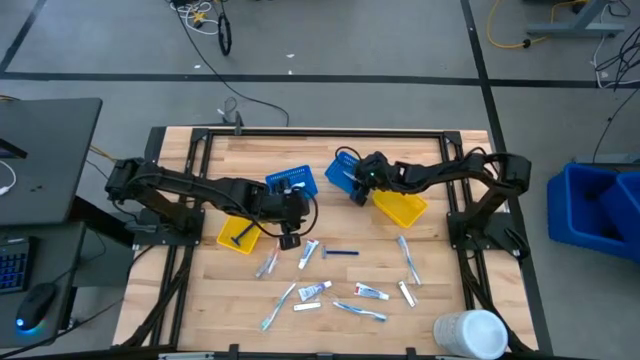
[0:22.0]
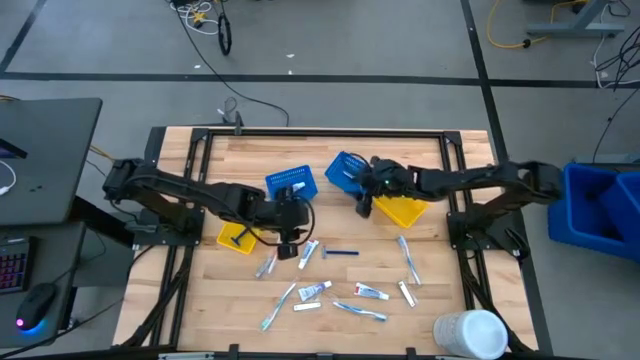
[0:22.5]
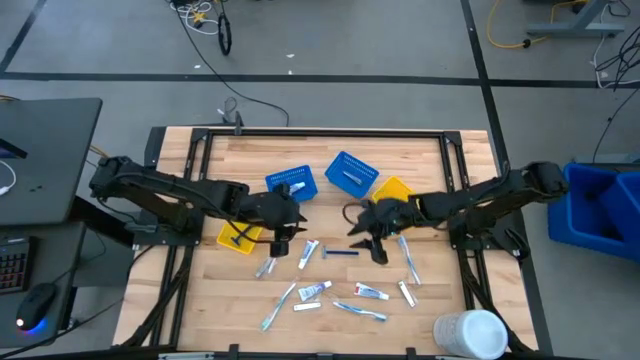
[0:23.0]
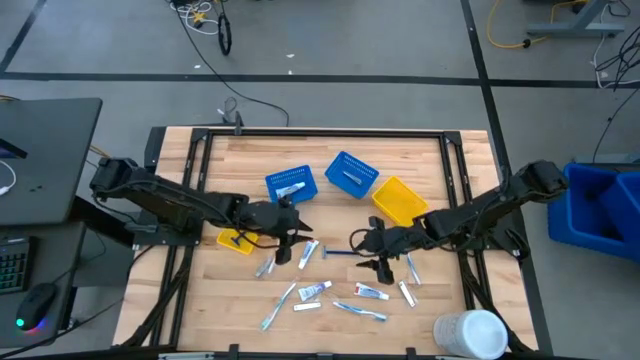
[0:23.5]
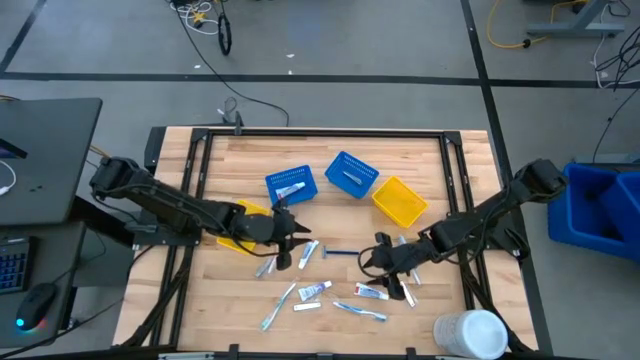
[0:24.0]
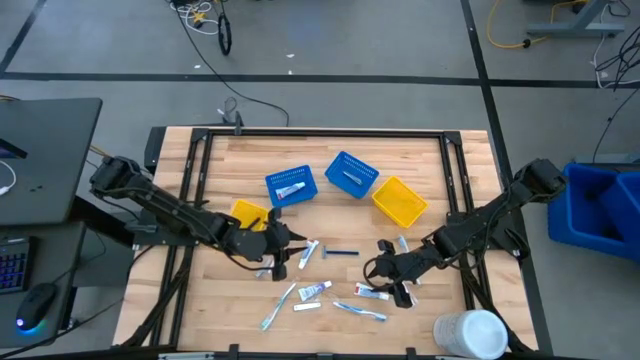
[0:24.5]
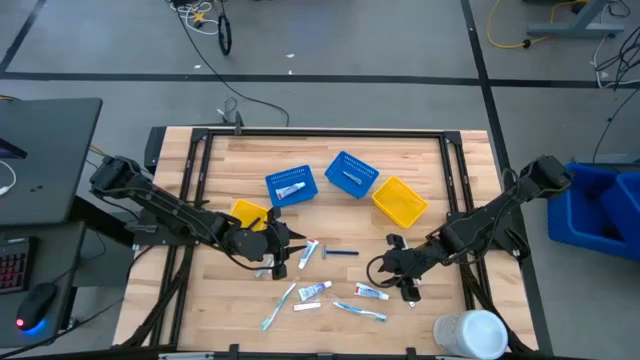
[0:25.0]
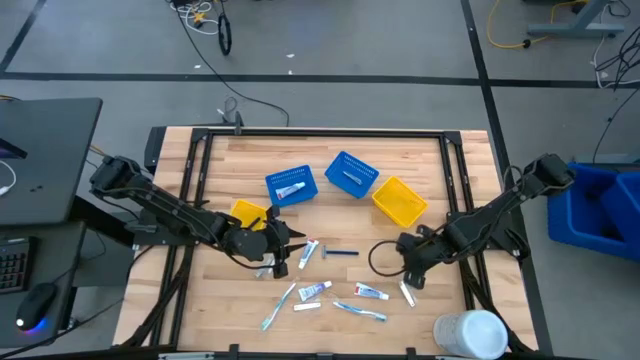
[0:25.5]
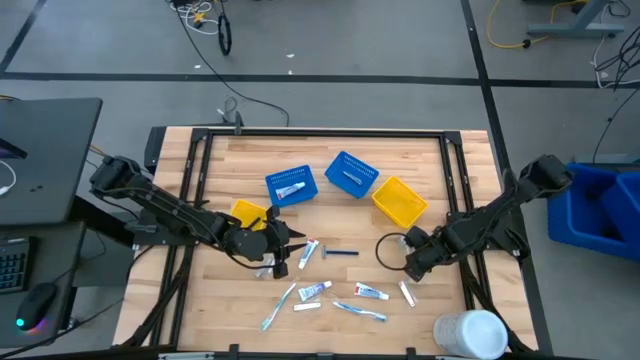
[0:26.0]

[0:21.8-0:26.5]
Task: Pick & Place Travel size toiletries
Put the blue toothbrush into the right yellow bin

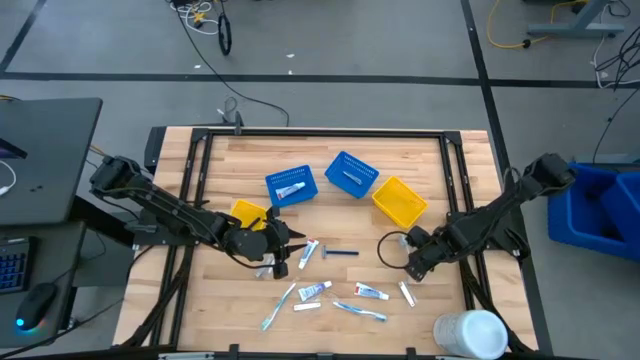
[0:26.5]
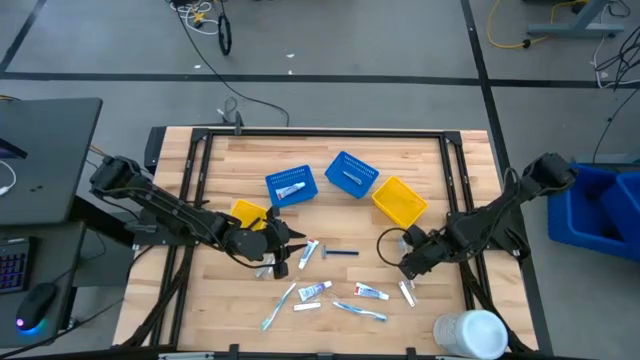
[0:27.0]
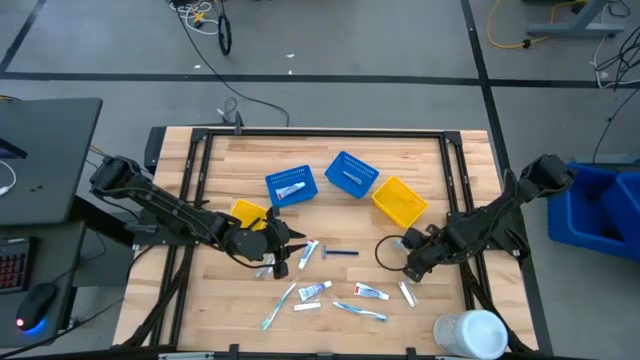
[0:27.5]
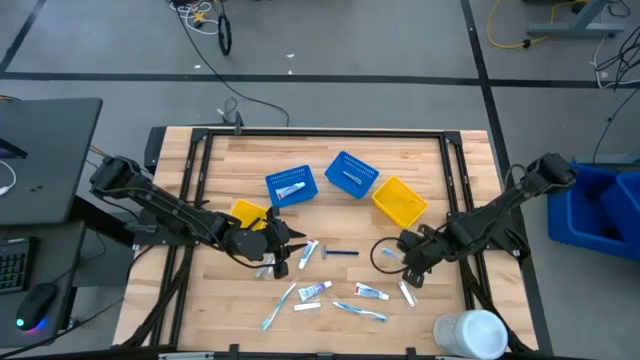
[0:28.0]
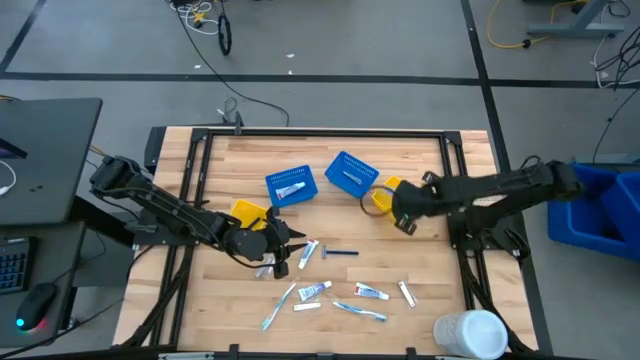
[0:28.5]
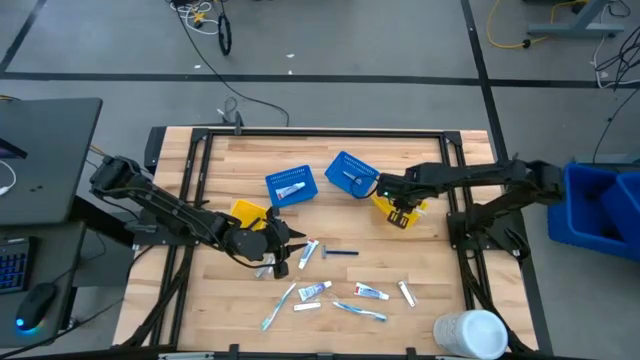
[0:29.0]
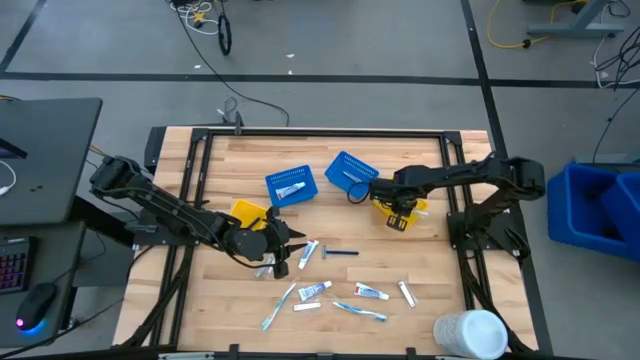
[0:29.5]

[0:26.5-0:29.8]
Put the blue toothbrush into the right yellow bin

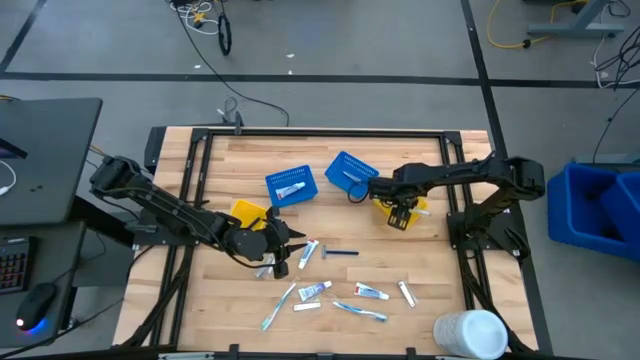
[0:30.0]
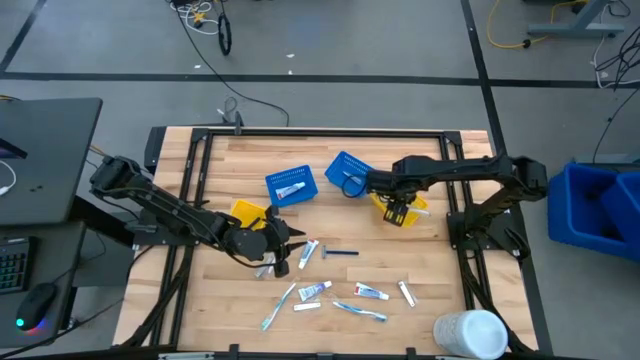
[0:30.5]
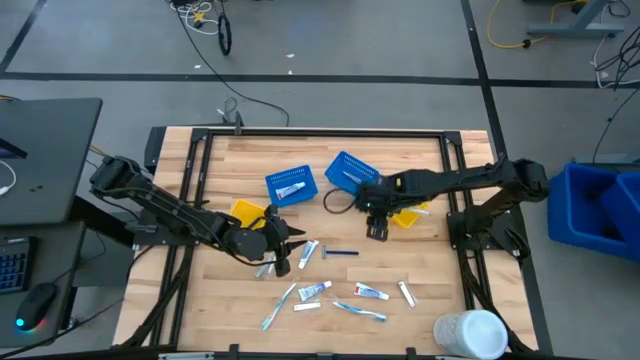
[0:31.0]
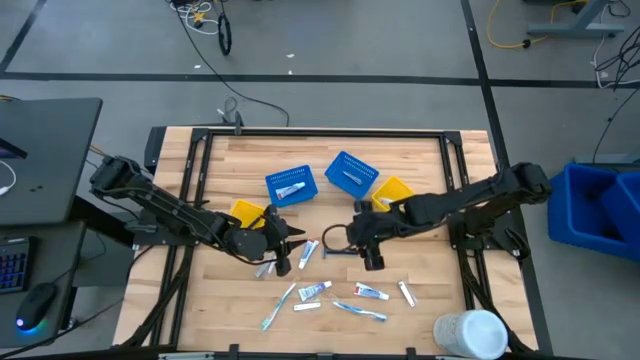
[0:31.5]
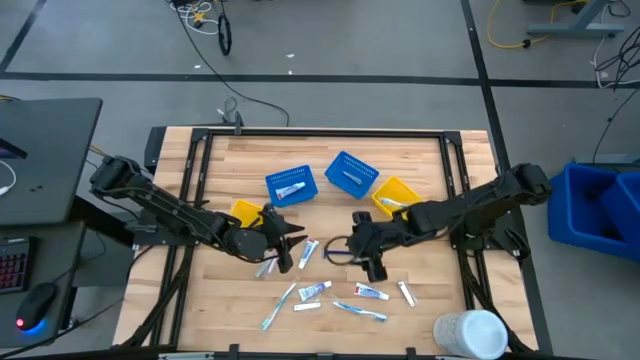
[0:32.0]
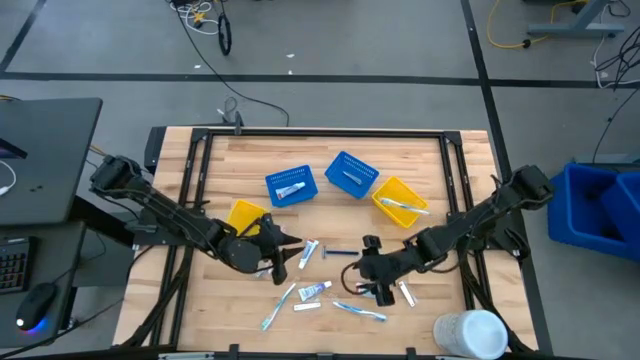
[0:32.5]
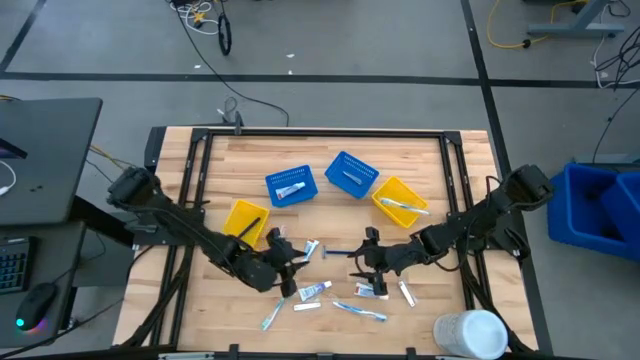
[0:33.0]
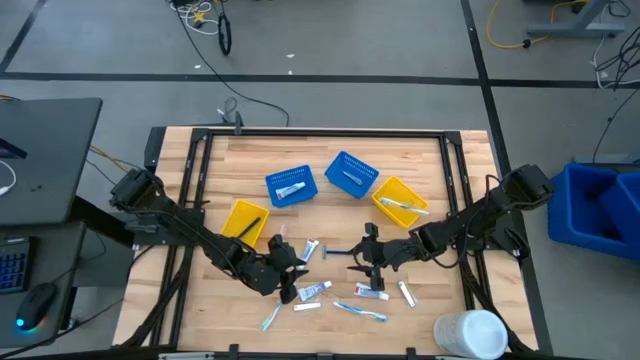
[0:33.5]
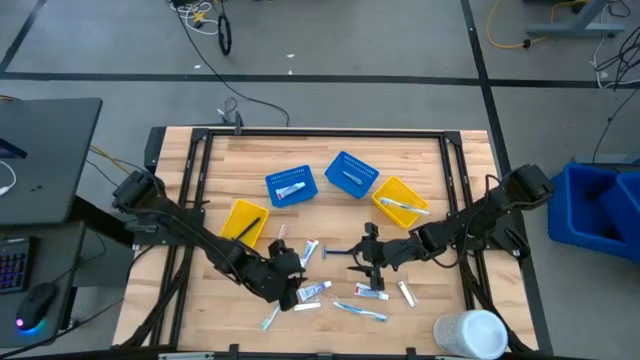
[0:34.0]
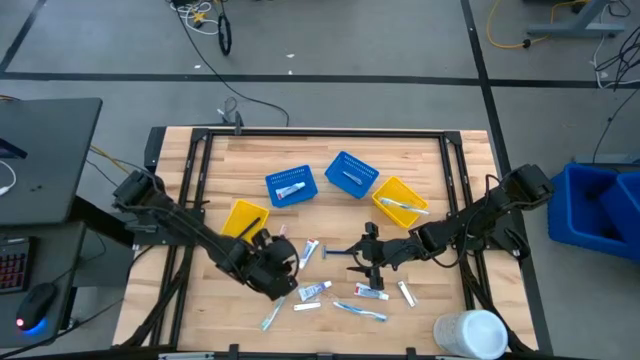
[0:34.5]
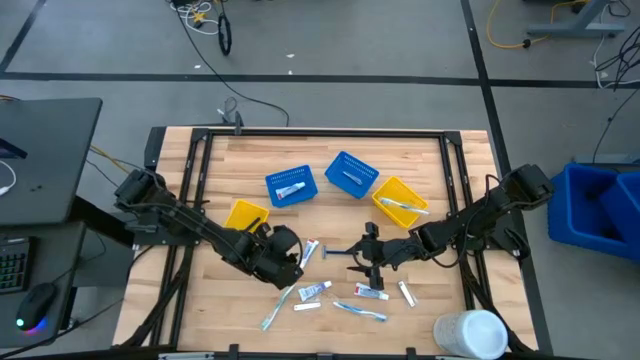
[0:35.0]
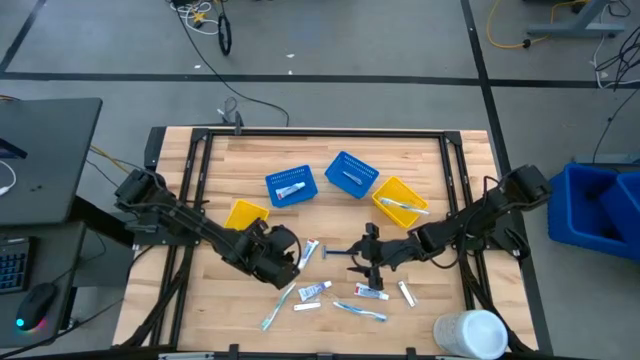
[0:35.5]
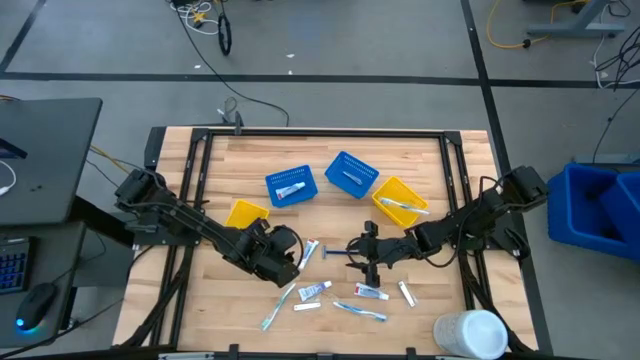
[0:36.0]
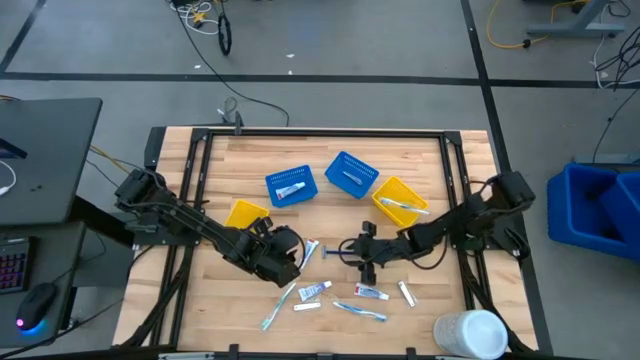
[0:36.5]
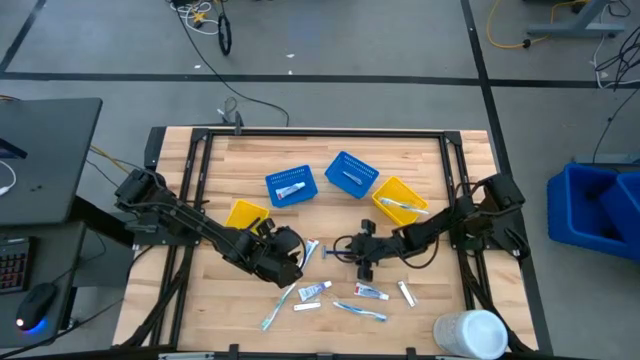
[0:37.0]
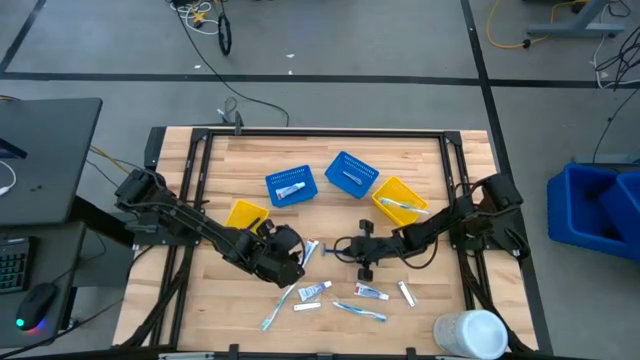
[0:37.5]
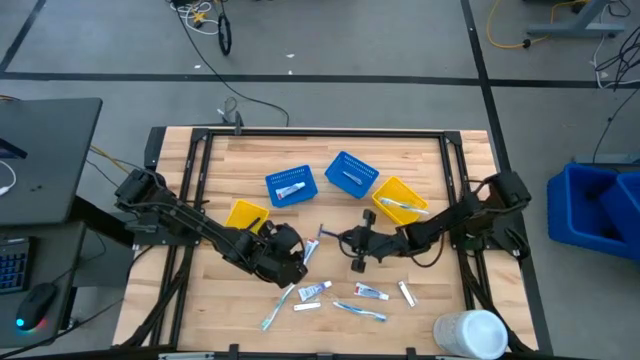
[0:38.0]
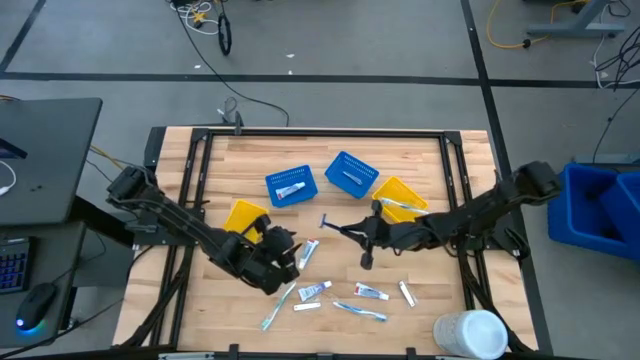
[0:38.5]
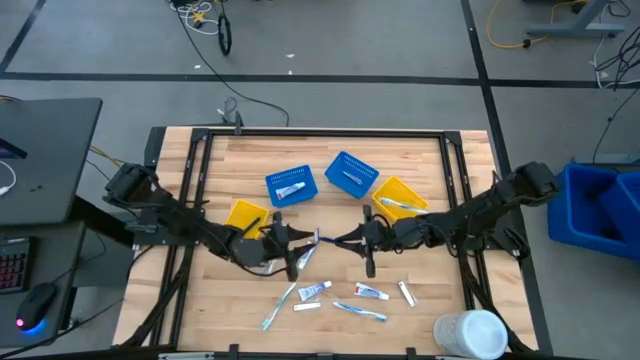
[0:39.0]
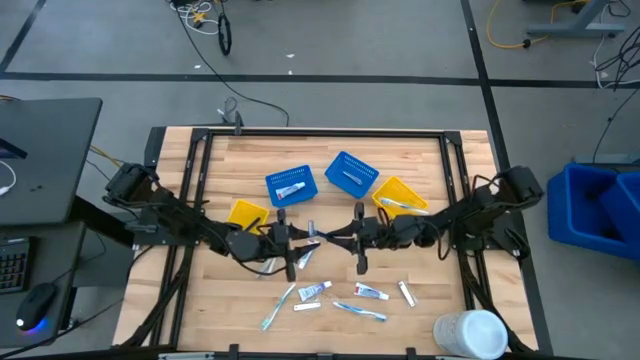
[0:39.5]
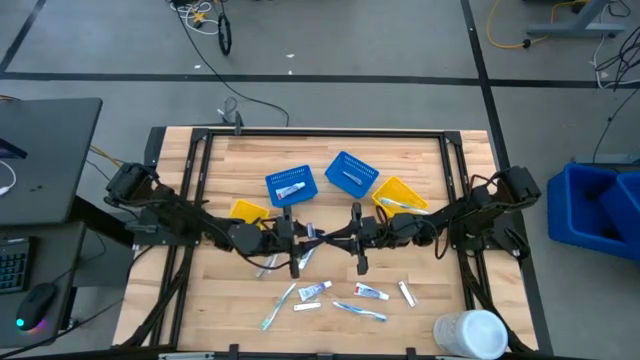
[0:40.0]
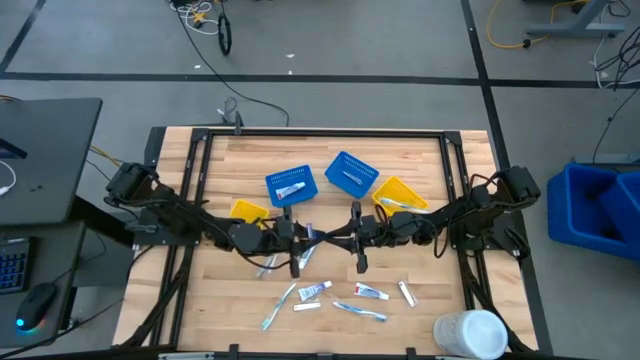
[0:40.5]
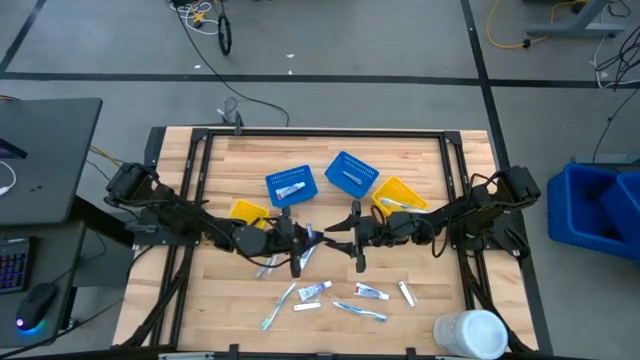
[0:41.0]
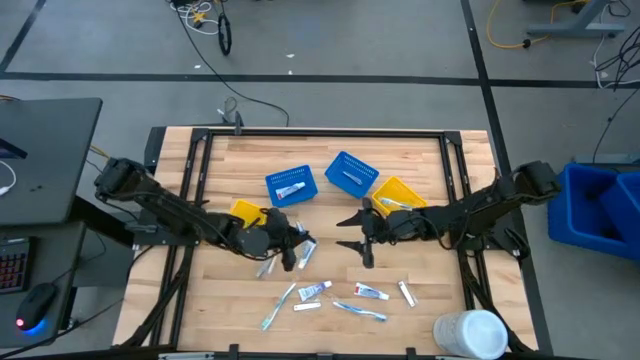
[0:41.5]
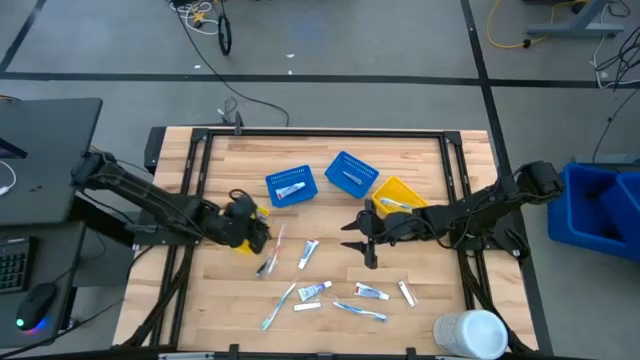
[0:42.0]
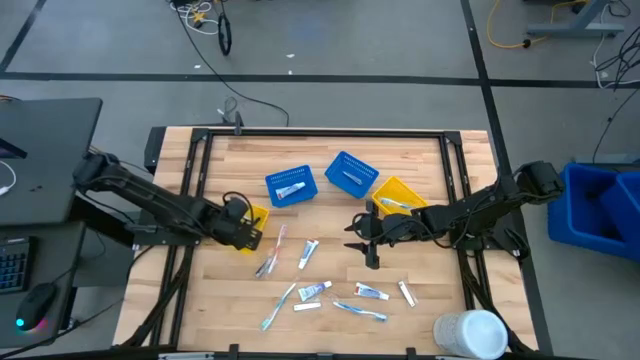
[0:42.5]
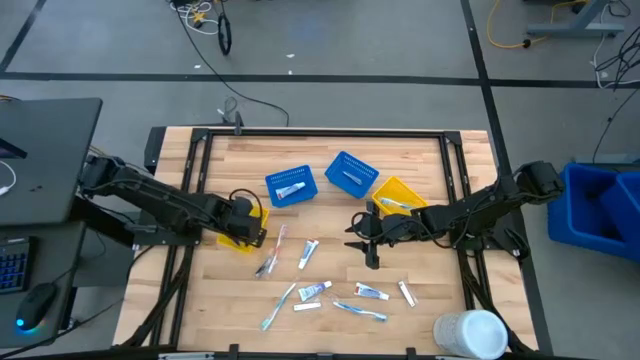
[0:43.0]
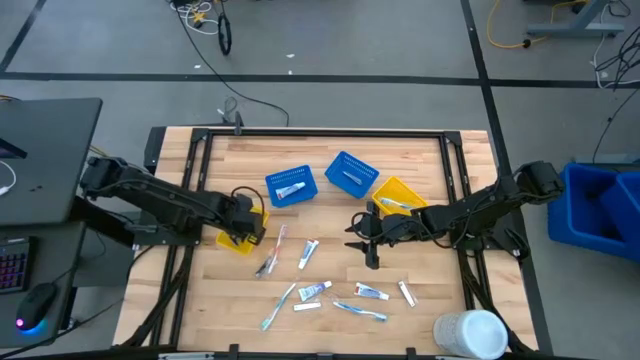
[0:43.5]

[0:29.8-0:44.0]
Put the blue razor into the left yellow bin
